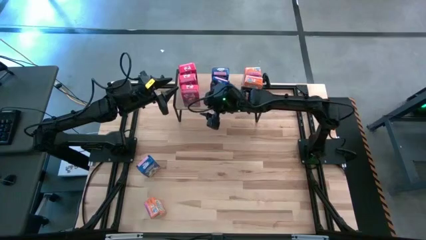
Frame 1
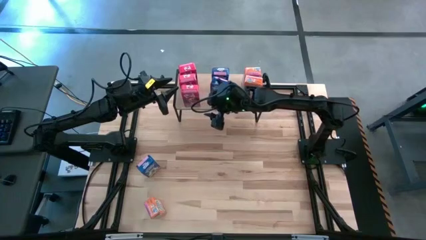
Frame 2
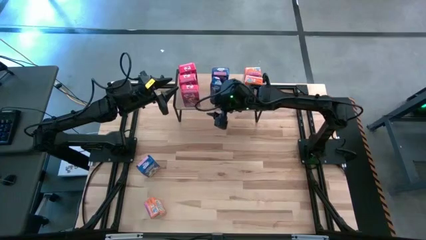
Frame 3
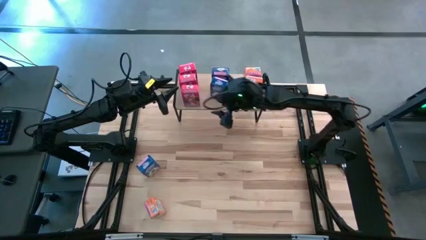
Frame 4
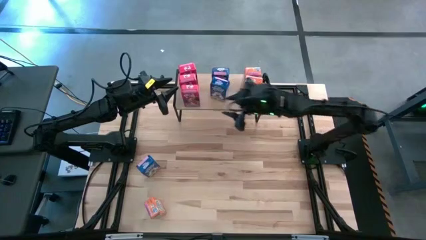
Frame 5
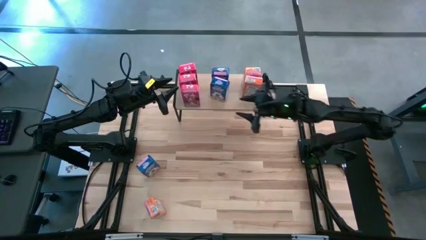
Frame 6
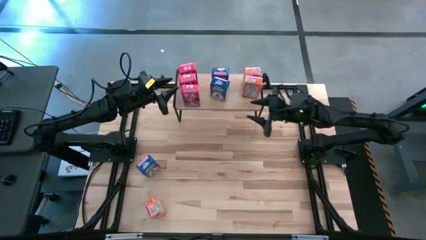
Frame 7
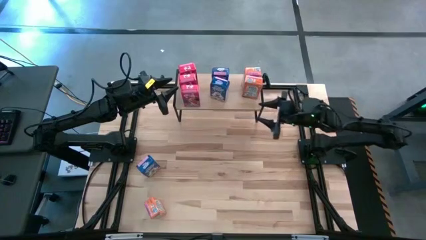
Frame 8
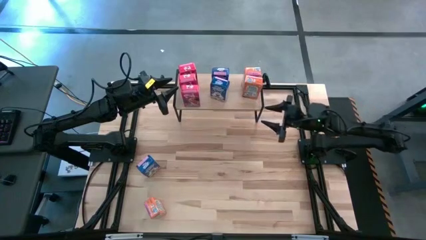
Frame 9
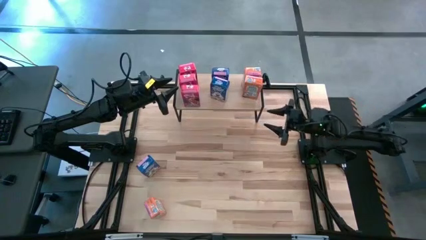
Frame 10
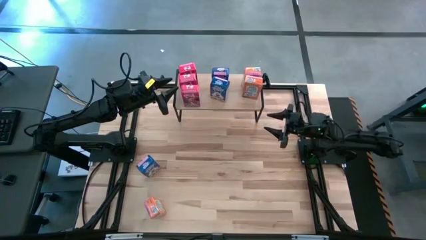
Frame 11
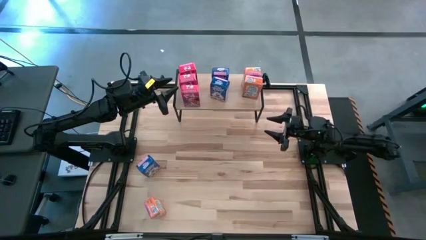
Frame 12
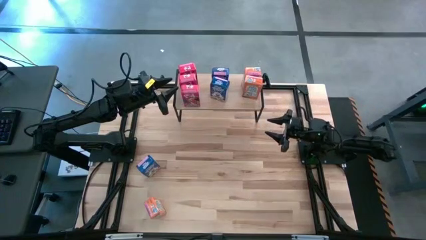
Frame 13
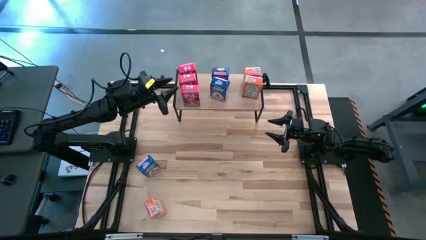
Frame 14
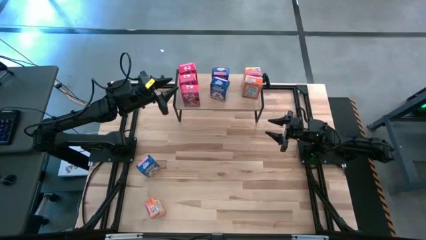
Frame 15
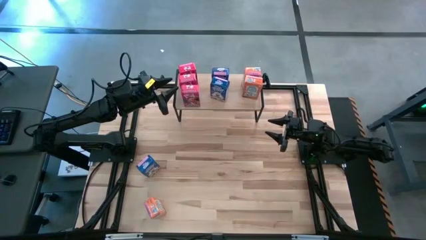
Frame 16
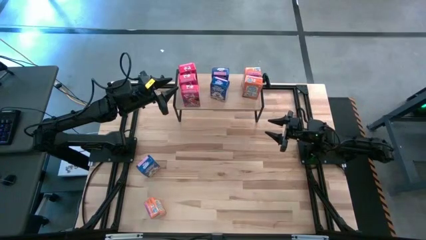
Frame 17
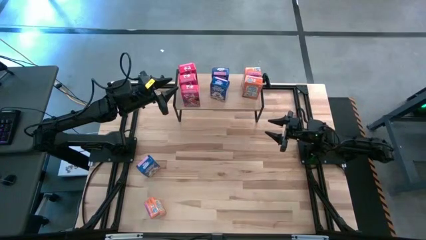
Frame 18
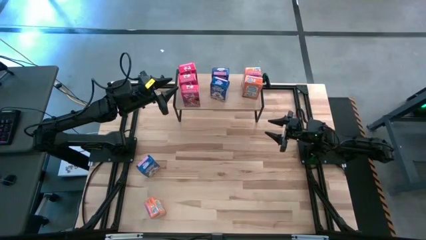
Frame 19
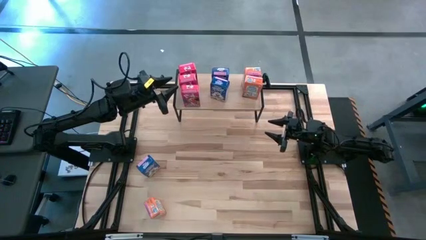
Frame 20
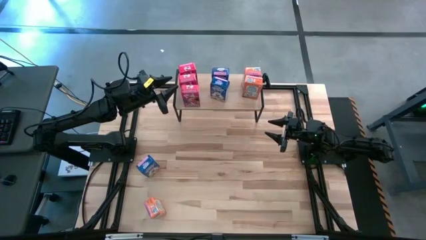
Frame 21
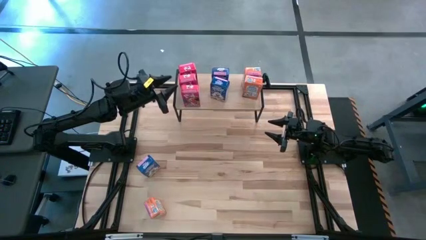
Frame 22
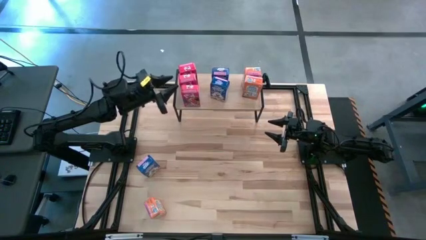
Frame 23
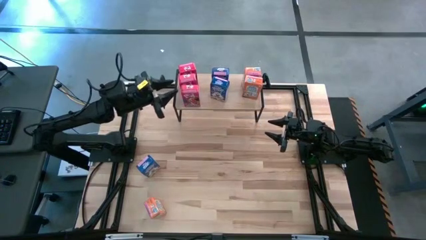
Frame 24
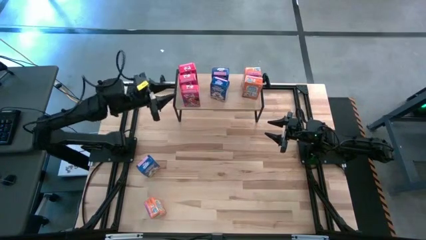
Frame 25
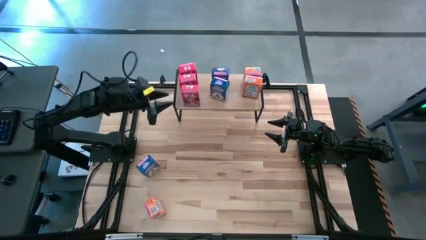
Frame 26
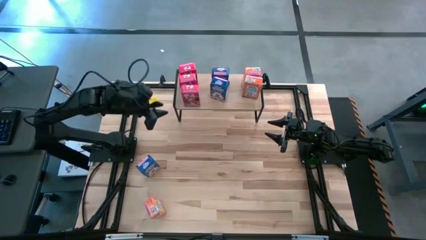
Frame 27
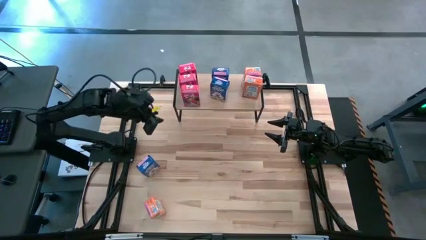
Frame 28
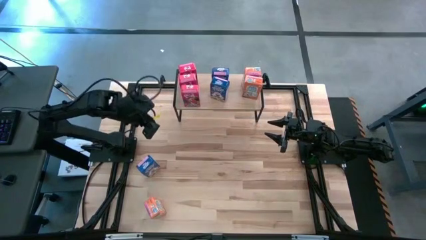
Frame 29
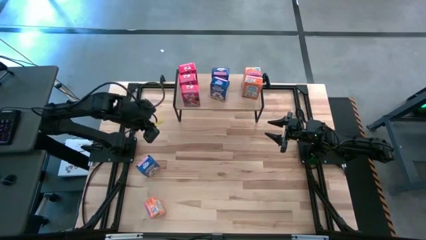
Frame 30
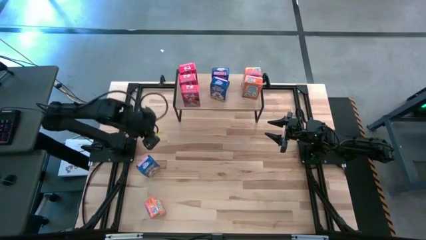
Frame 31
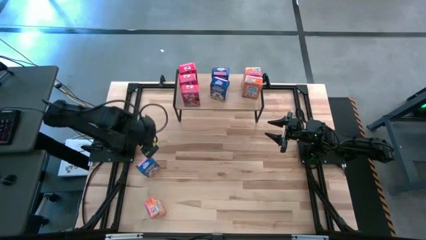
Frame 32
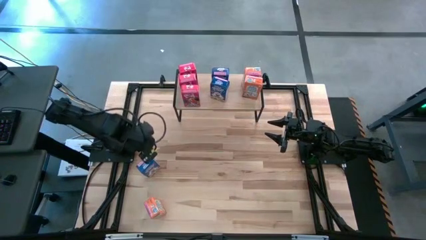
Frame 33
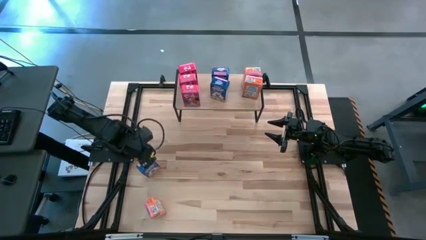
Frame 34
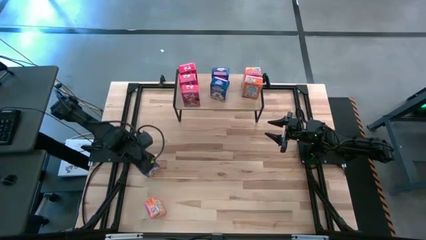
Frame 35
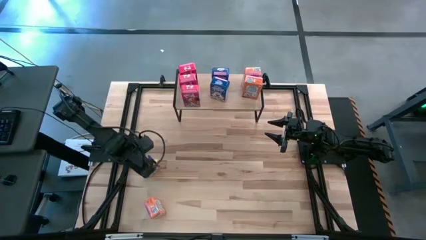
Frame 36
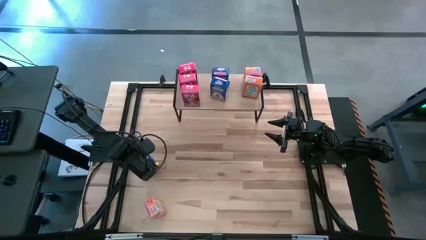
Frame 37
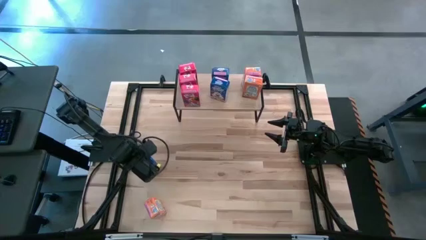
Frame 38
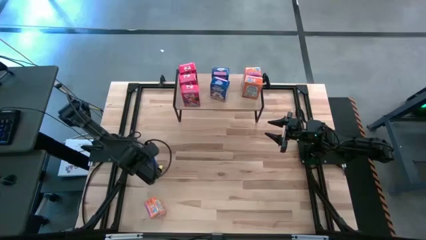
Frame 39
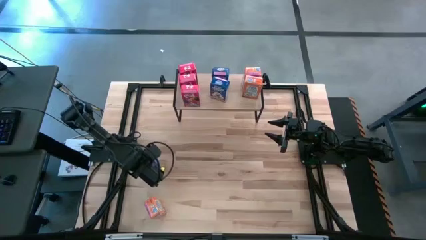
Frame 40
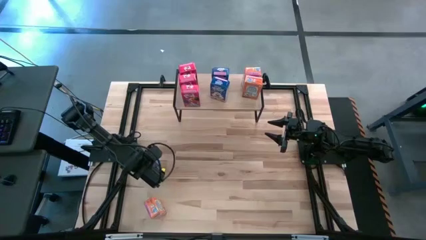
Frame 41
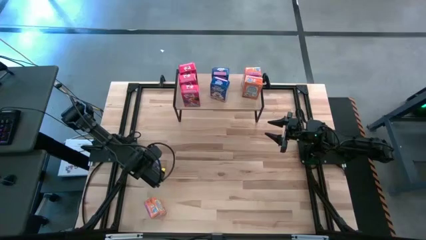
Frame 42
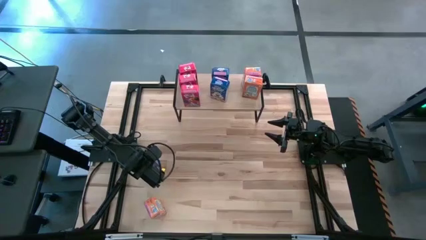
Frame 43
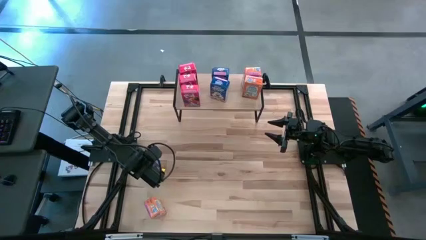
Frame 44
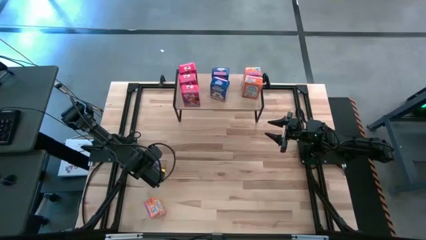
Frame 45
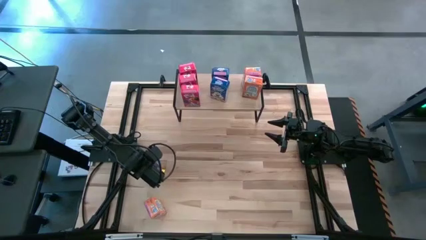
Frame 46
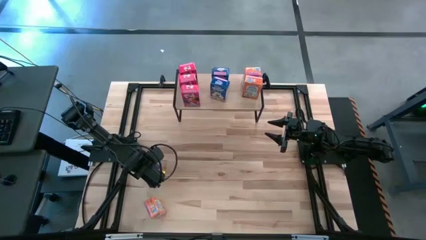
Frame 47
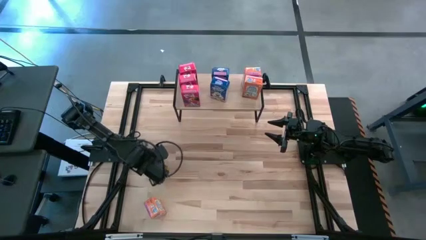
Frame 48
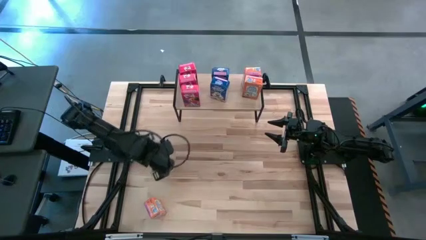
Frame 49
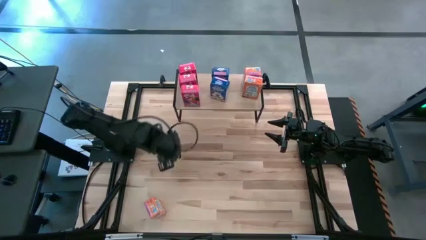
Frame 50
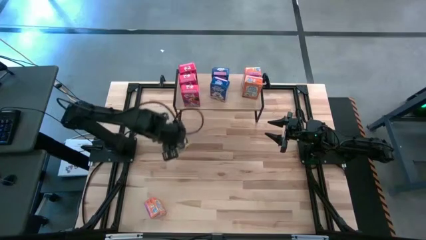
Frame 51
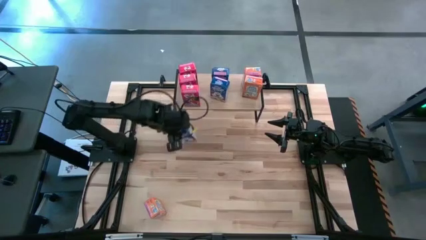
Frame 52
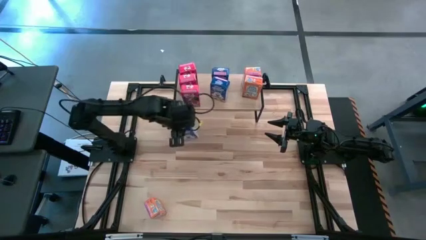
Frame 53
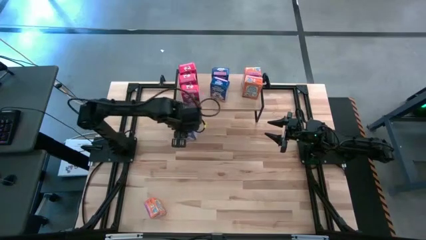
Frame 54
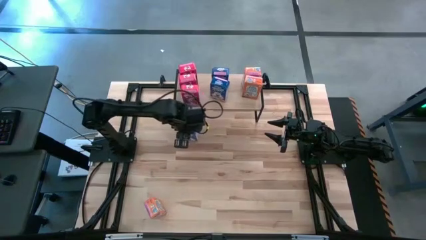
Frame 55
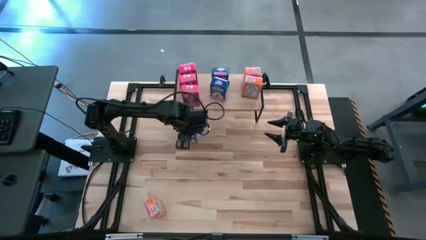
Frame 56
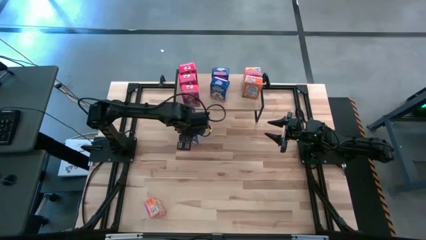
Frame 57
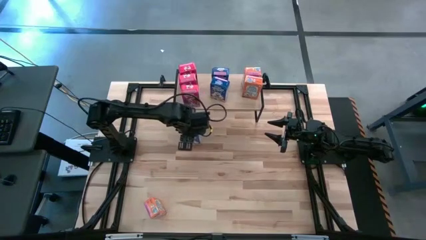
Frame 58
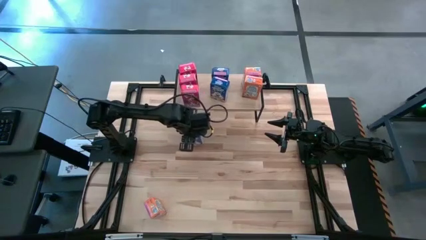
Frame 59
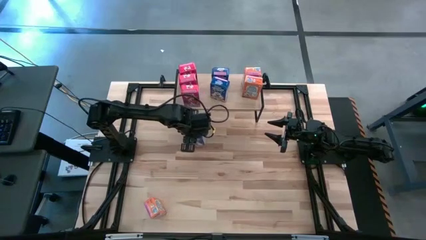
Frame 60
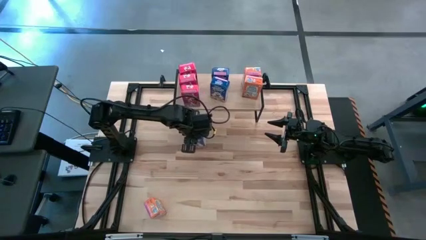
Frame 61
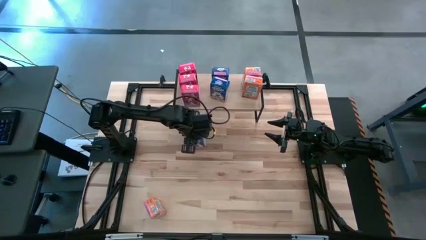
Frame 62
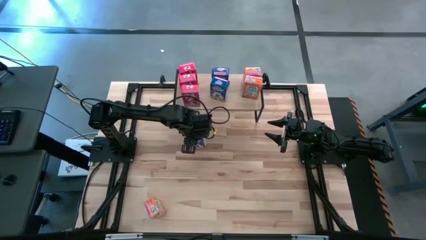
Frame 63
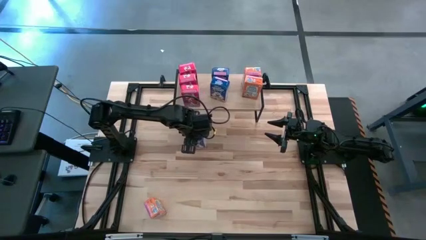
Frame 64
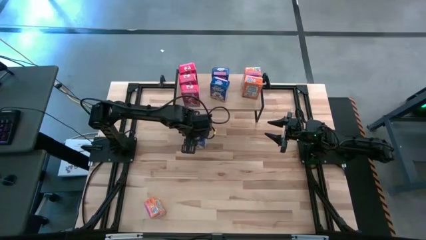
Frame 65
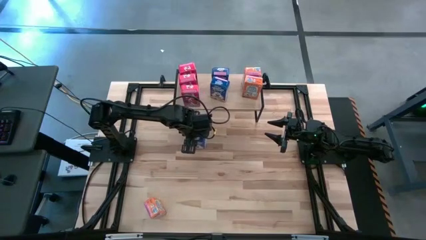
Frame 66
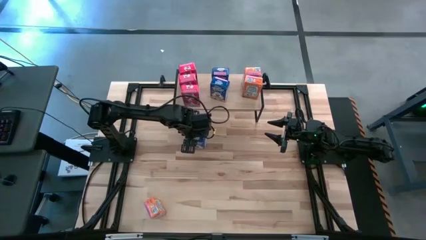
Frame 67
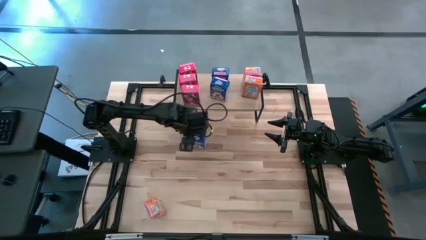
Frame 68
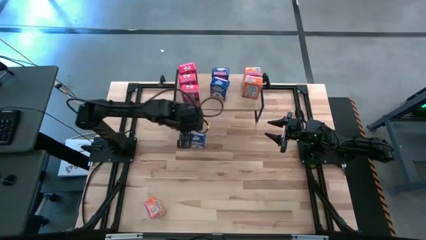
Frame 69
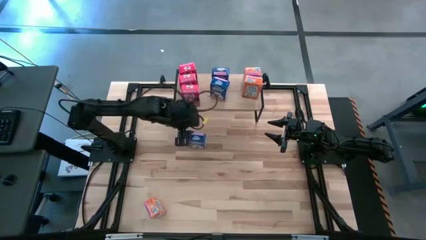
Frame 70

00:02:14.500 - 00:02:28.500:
Task: Stack cereal on shelf
Put the blue cereal box on the shelf aligned with the other blue cereal boxes
